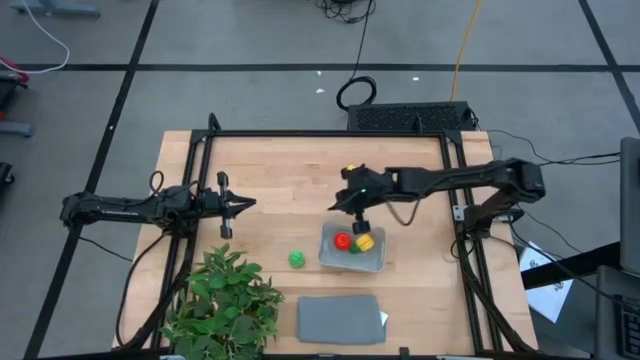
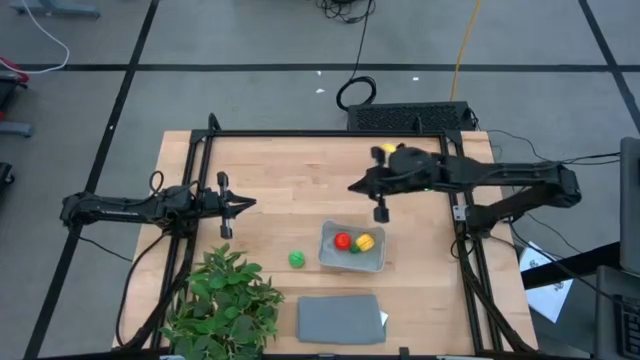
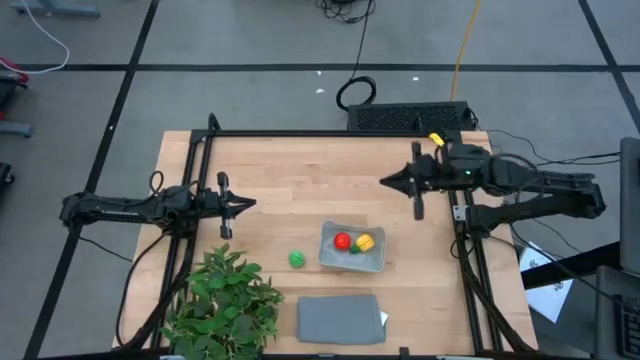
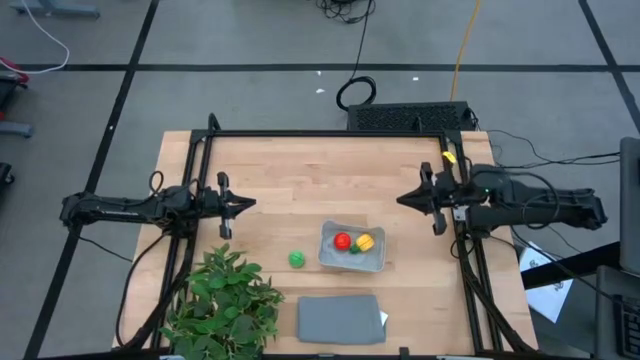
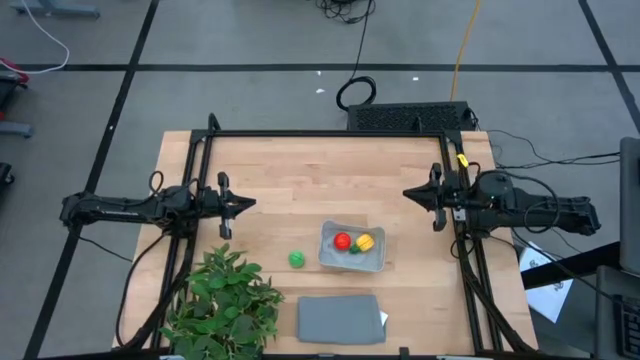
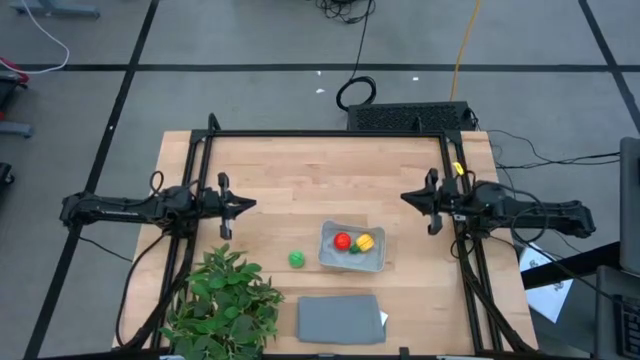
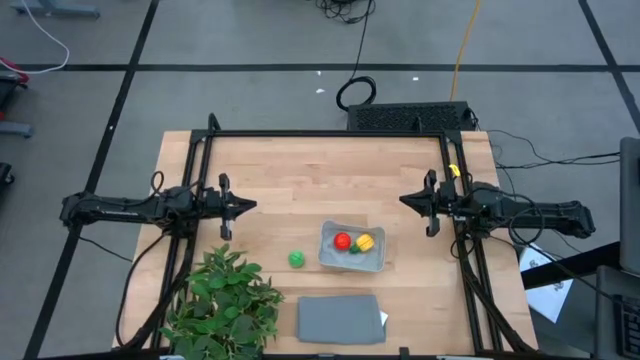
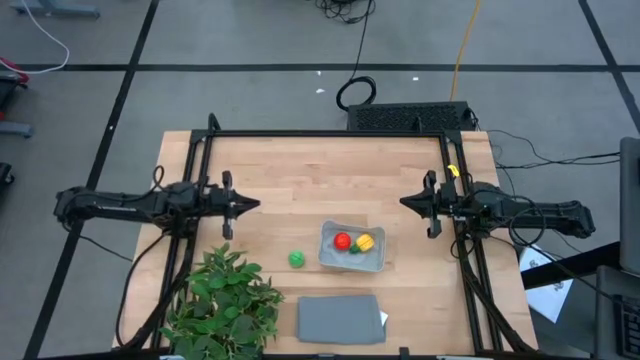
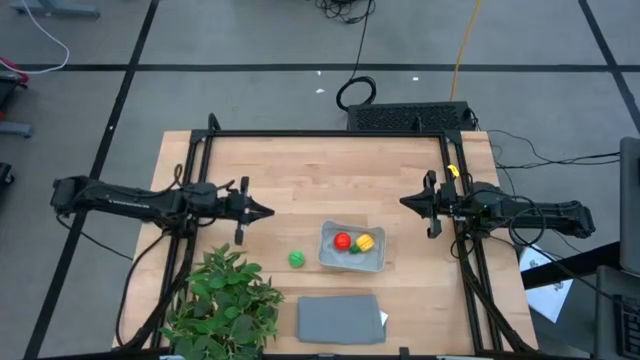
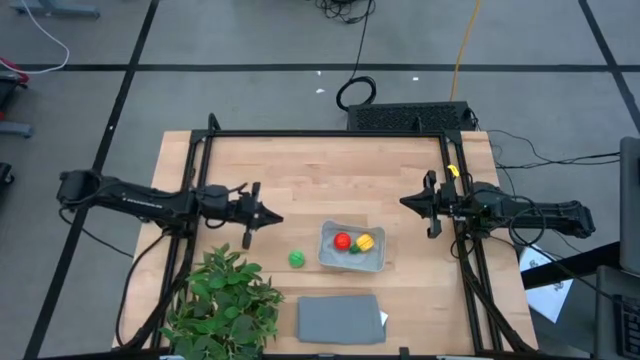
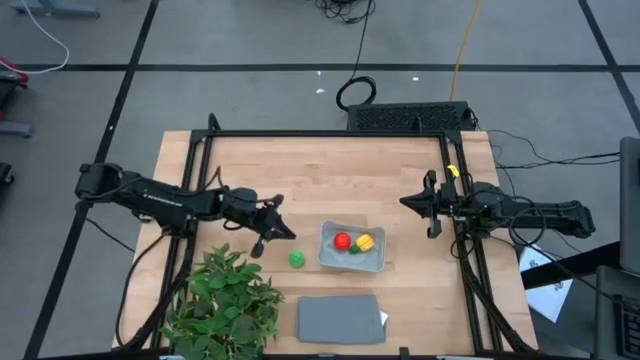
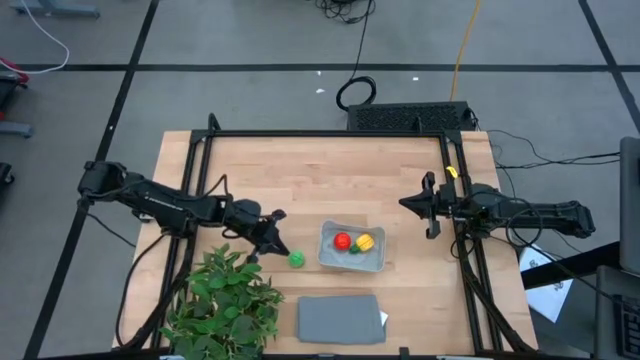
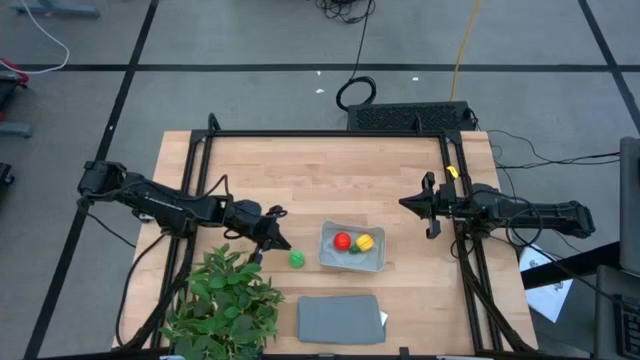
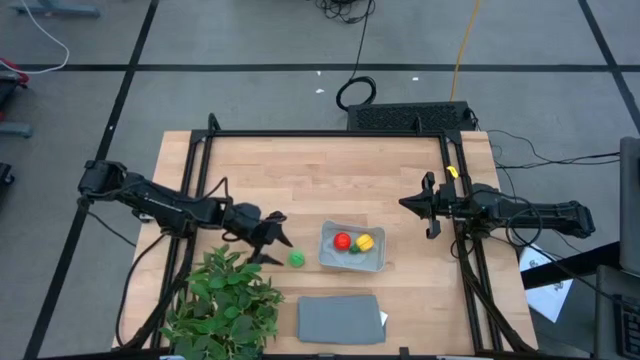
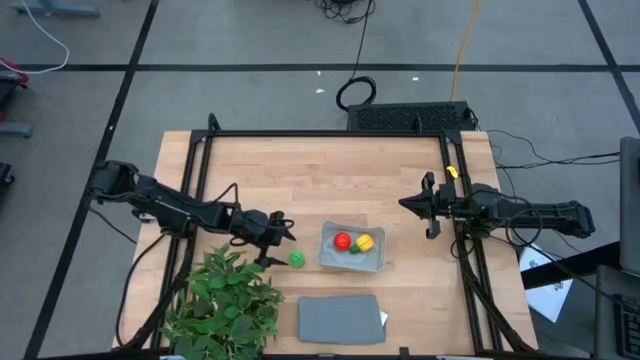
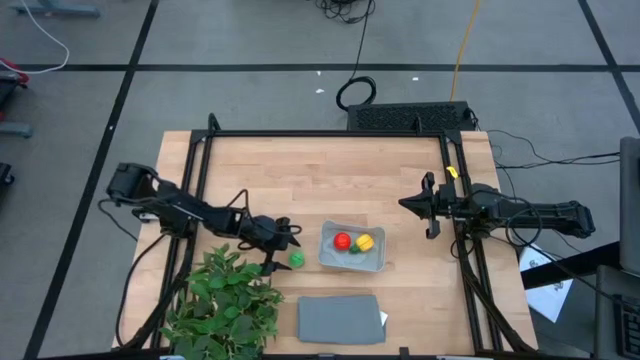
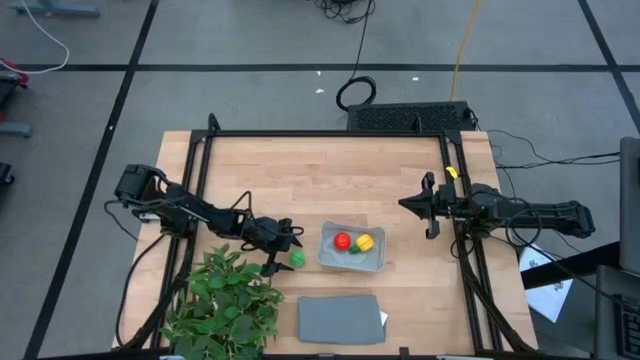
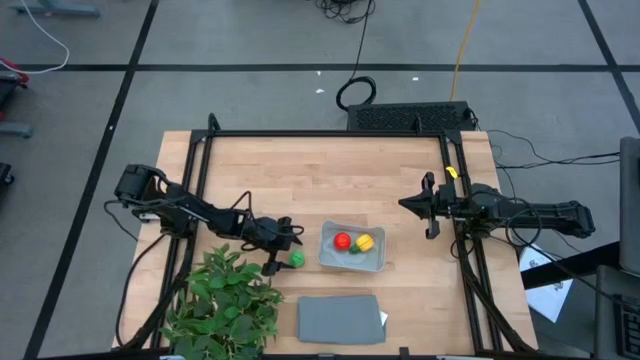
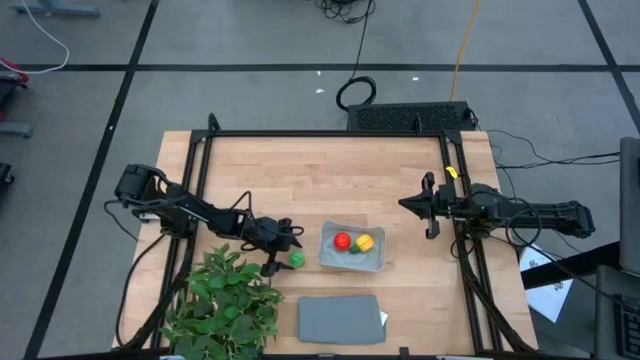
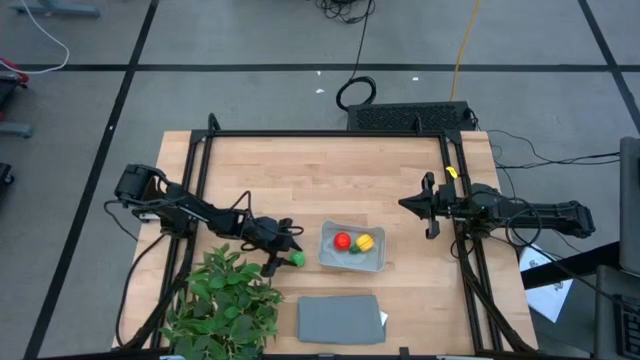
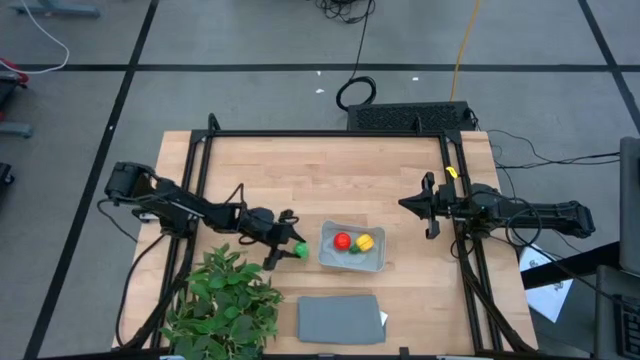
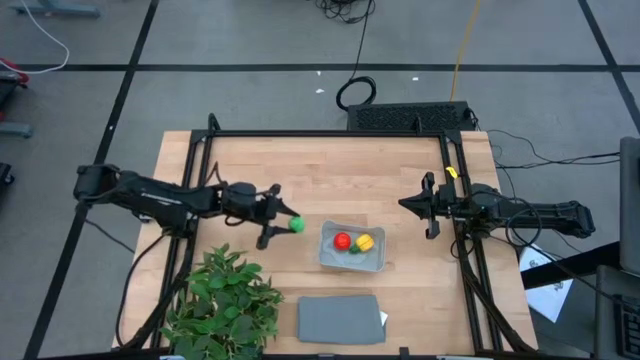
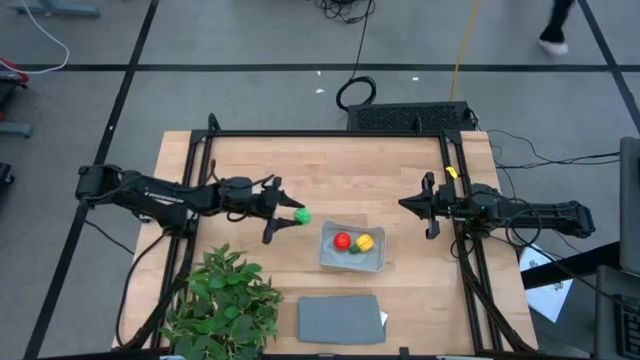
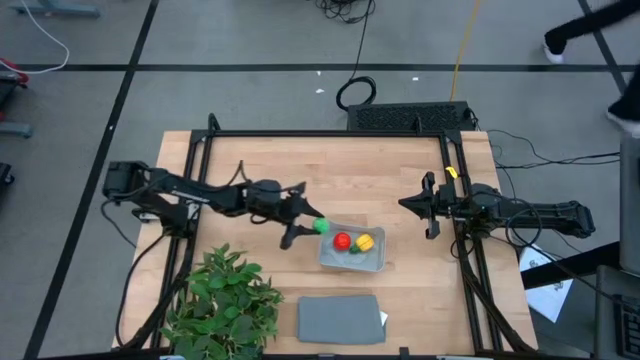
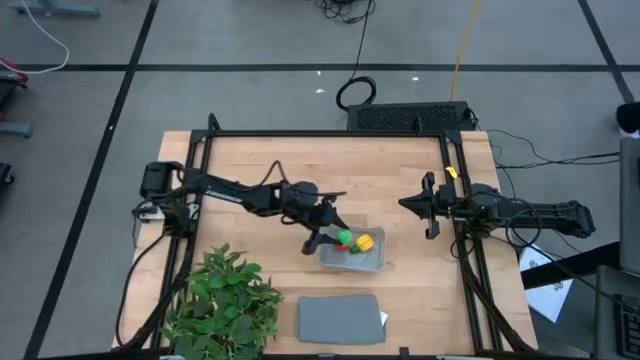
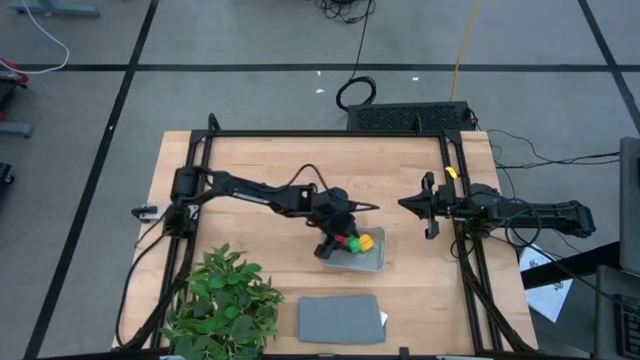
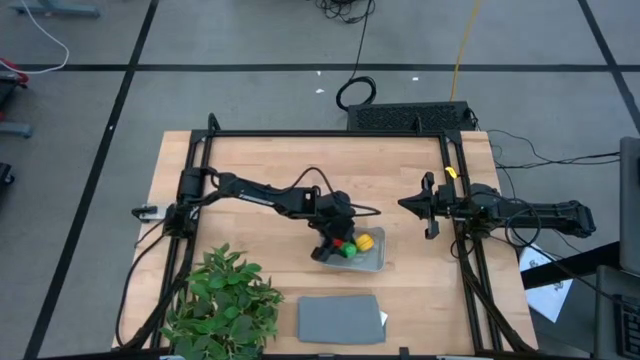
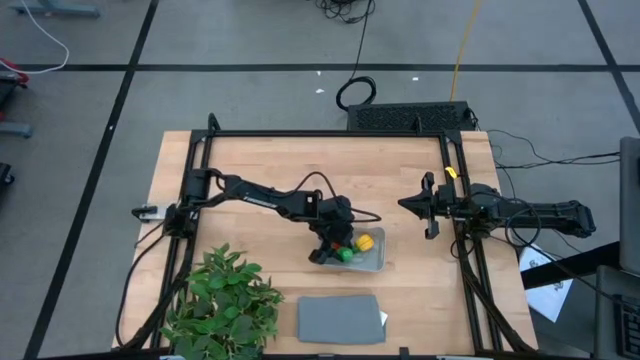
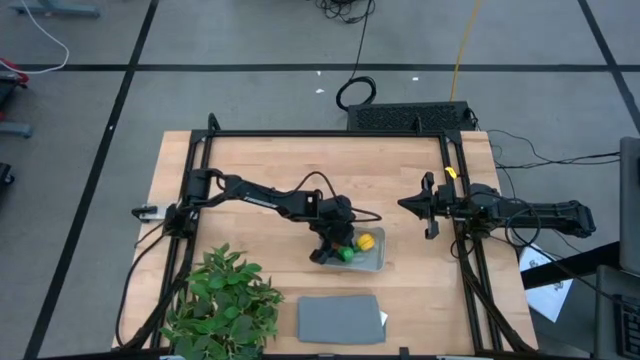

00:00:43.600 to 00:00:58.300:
Task: Pick and placing Produce into tupperware
Put the green pear into the gray bin
